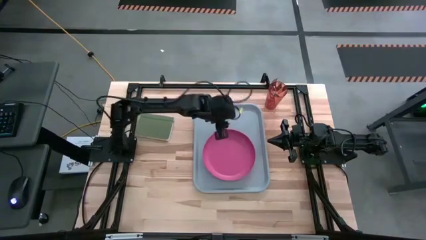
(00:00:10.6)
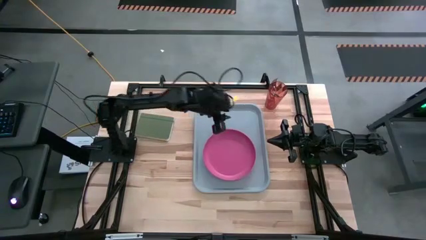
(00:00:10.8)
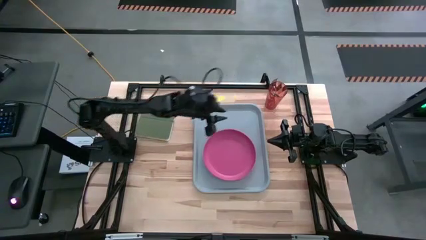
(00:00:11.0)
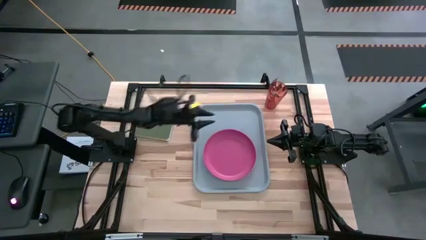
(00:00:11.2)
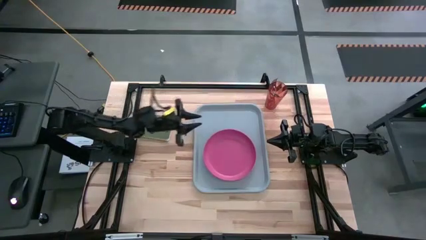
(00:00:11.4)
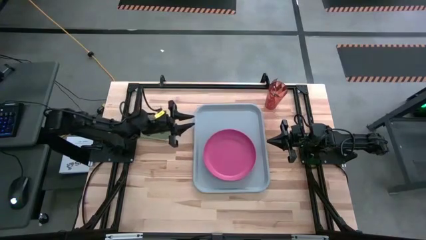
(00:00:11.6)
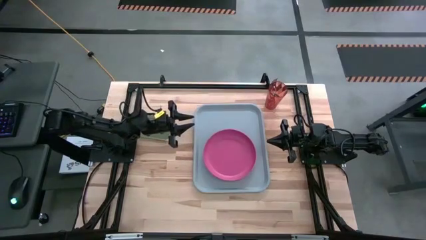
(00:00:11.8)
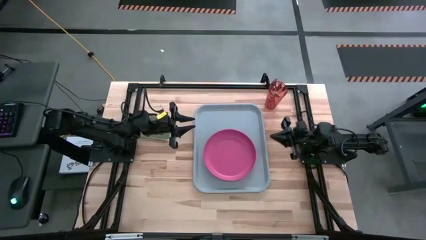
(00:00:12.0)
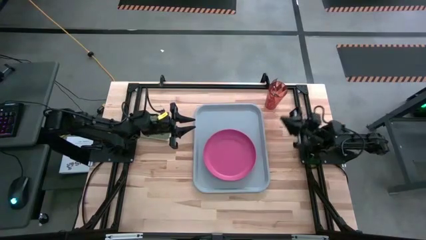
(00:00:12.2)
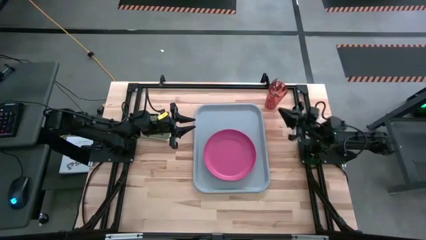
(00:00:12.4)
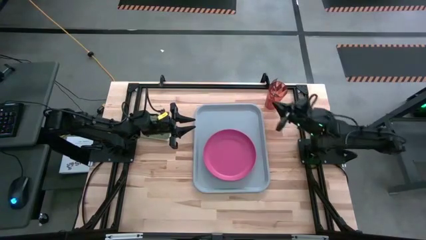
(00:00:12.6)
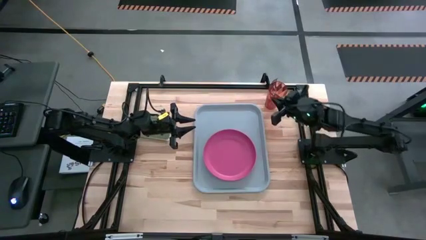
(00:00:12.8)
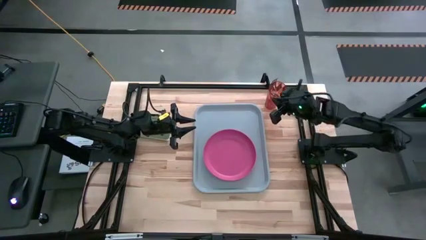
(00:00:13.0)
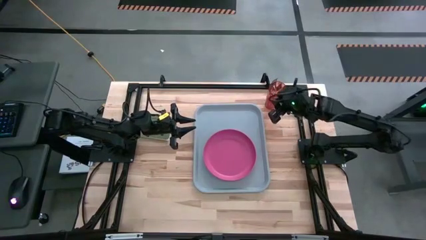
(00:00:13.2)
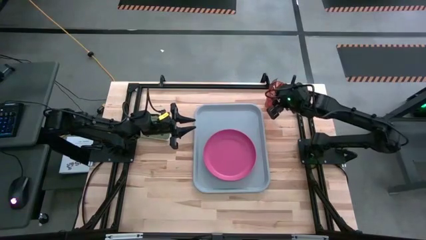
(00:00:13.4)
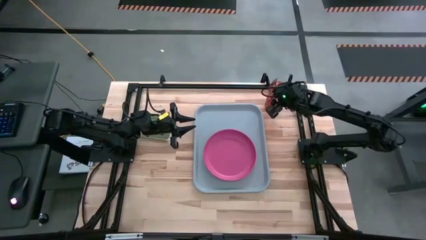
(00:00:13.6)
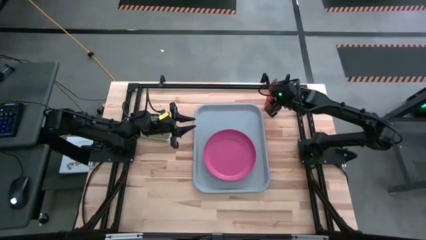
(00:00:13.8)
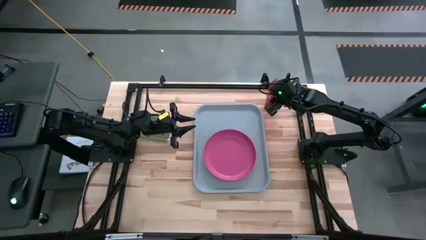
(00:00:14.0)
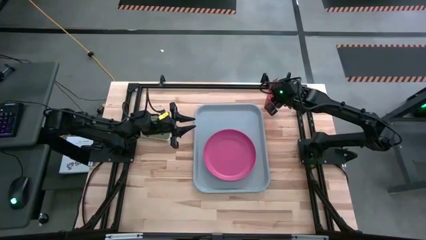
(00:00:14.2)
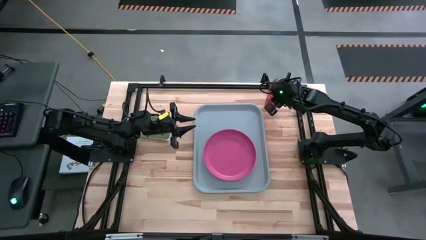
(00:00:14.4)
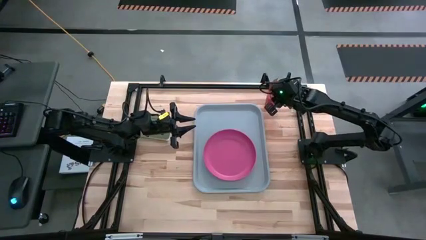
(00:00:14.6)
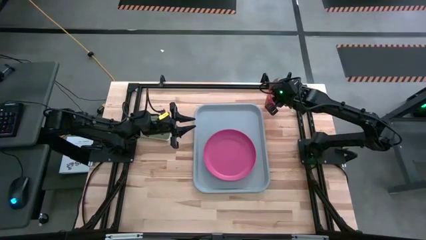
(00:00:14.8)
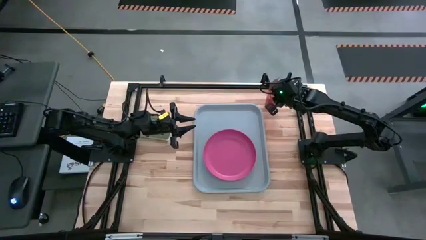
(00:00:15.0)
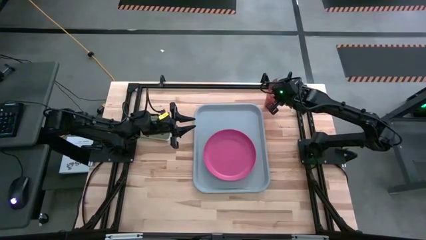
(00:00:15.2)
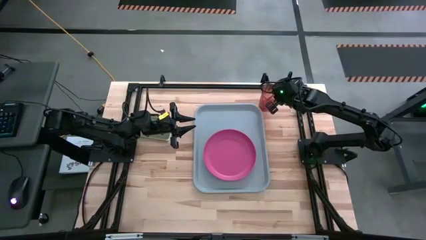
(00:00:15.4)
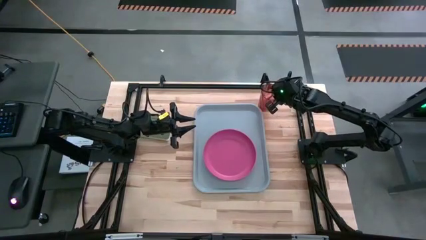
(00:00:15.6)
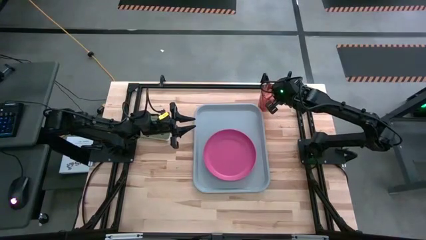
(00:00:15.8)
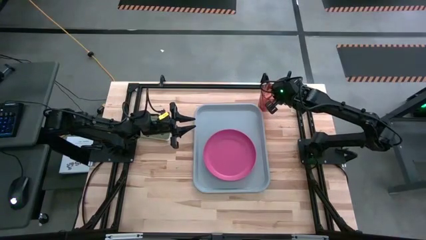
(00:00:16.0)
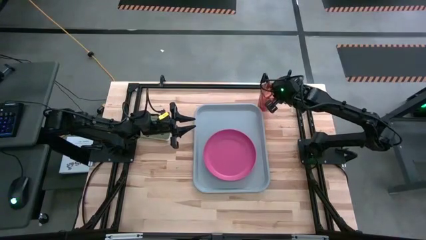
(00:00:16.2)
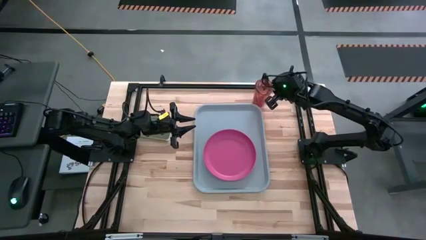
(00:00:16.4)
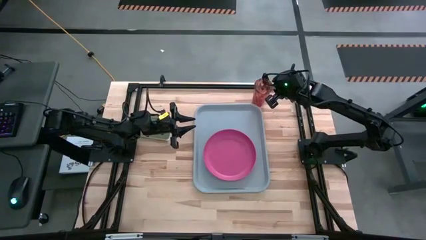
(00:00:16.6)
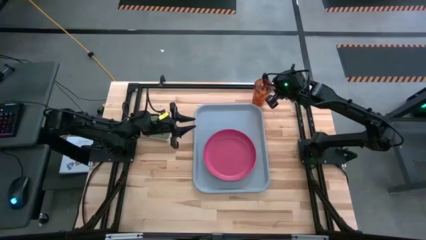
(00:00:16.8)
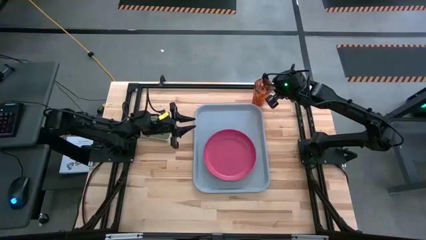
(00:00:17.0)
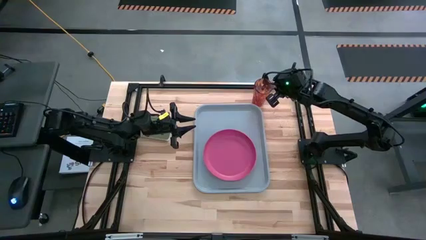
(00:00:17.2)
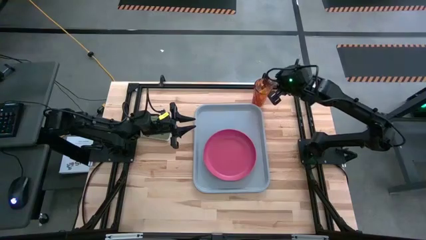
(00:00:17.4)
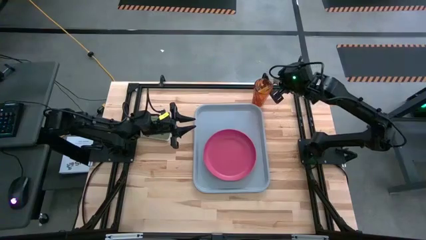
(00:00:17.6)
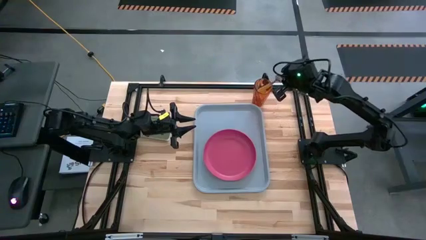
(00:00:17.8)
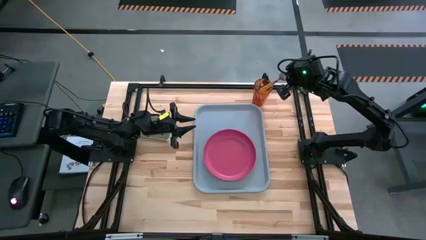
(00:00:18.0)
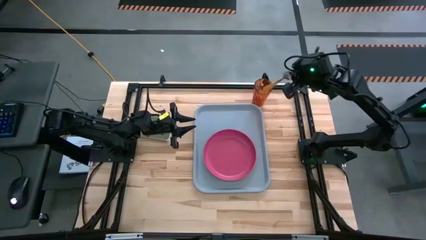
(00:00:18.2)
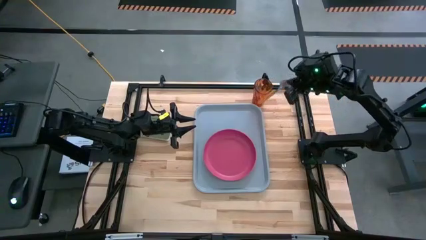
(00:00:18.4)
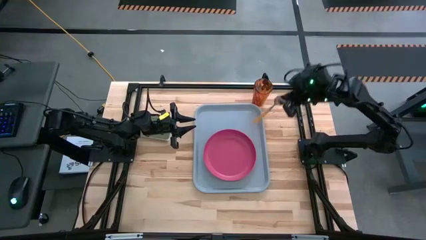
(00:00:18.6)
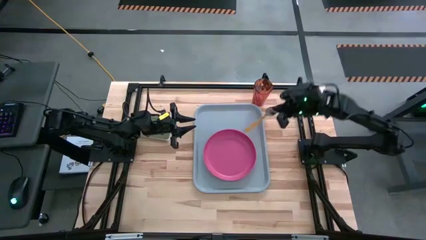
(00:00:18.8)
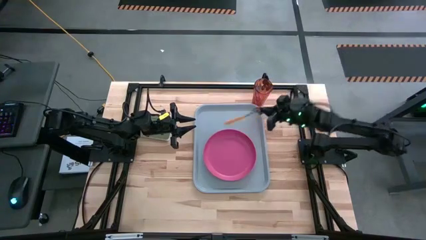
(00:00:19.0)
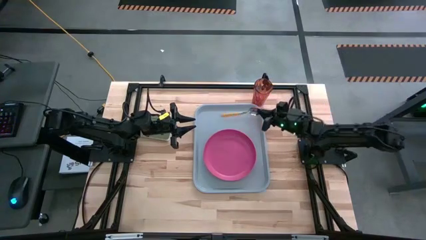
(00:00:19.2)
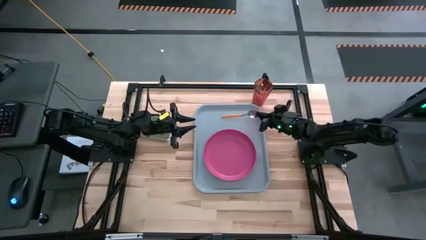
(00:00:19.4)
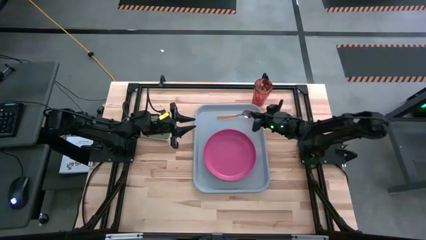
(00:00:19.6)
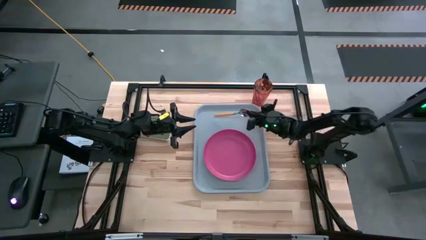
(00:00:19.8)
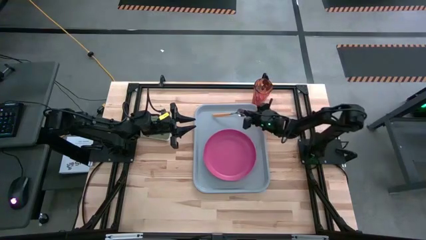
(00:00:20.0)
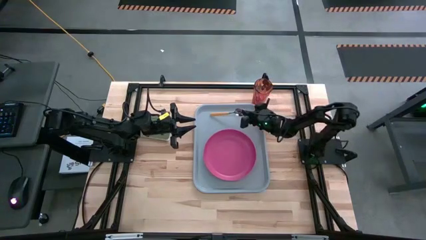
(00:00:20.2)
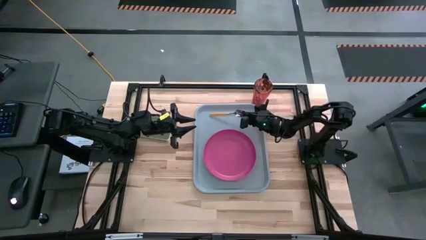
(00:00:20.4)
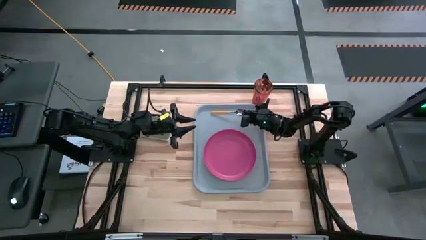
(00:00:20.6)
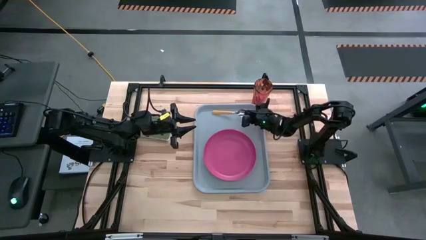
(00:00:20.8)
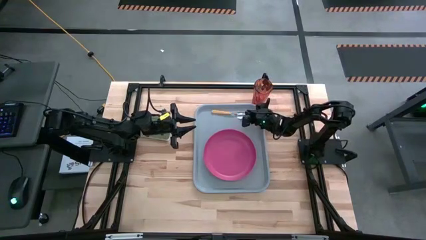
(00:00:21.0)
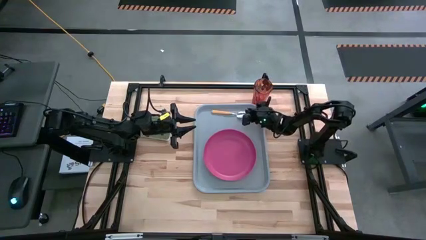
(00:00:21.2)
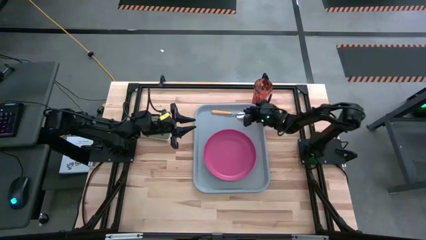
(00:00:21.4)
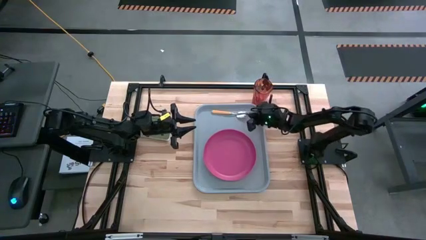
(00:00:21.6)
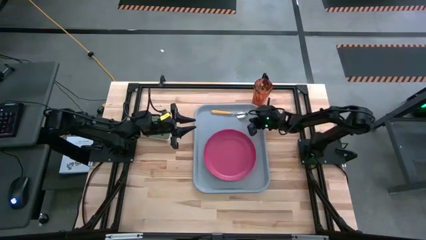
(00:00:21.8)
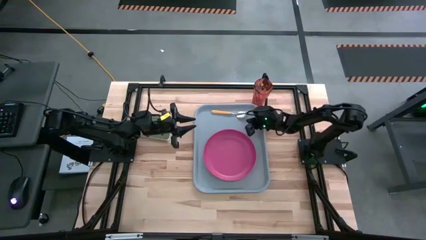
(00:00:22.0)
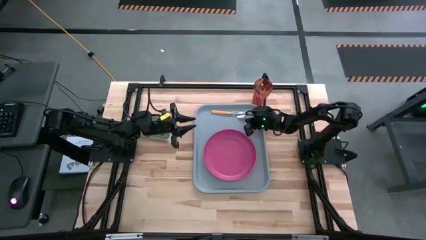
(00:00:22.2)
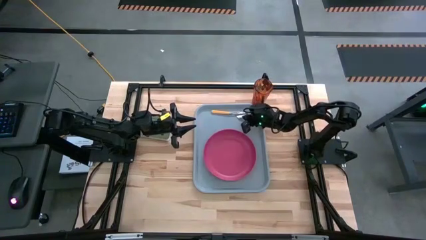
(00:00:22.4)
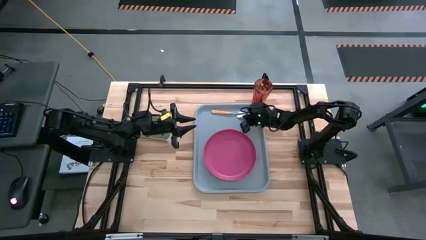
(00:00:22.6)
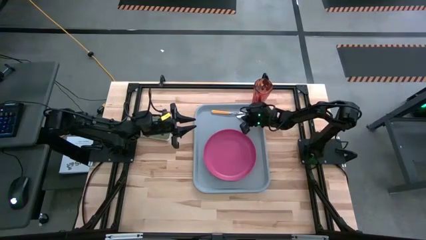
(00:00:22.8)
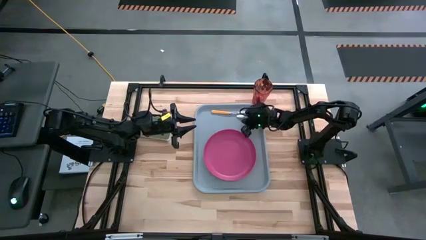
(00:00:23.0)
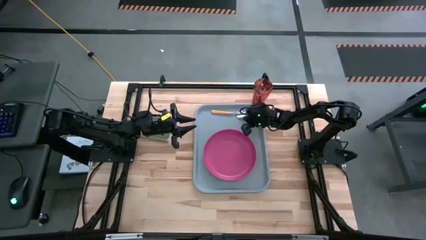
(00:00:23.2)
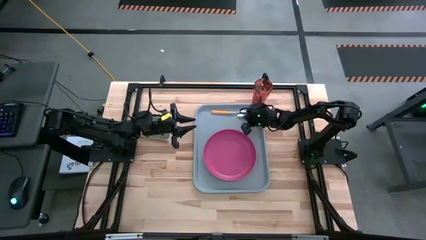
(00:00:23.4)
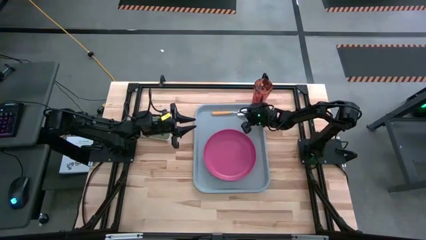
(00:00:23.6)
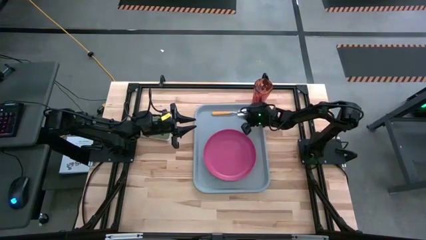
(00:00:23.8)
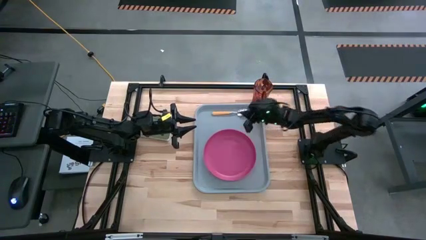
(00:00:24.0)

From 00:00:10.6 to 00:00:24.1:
Task: Pick and place plate/cup/fork/spoon on tray
Put the spoon on the tray at the top of the plate

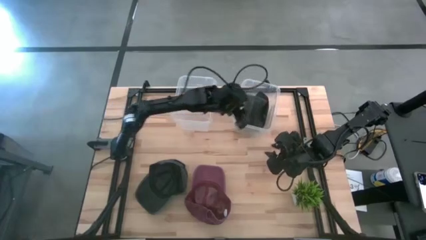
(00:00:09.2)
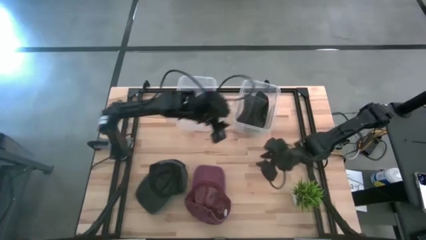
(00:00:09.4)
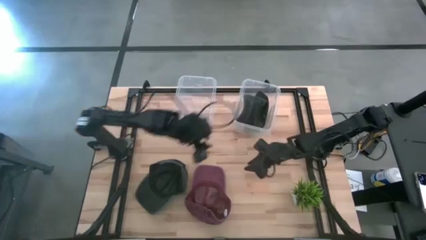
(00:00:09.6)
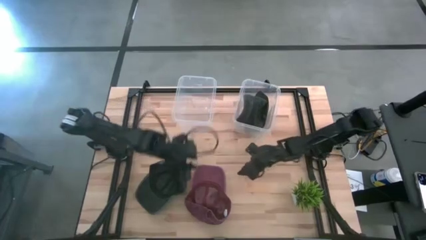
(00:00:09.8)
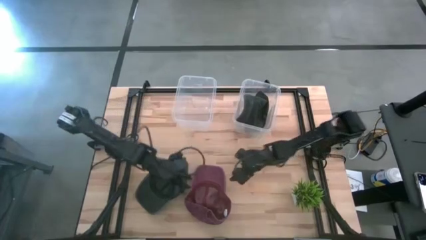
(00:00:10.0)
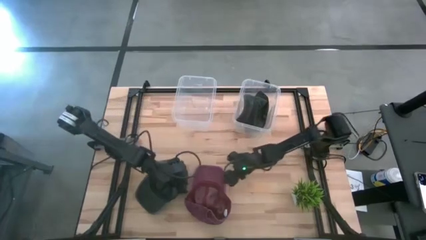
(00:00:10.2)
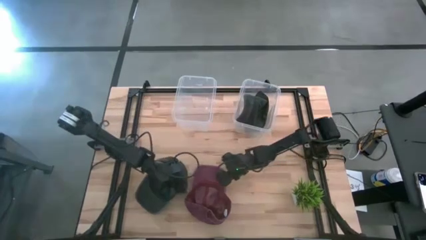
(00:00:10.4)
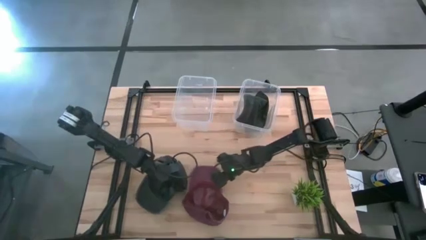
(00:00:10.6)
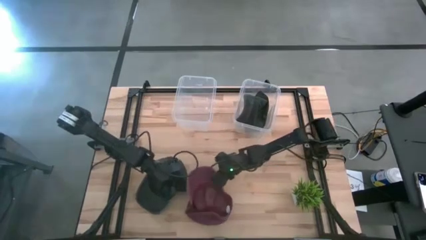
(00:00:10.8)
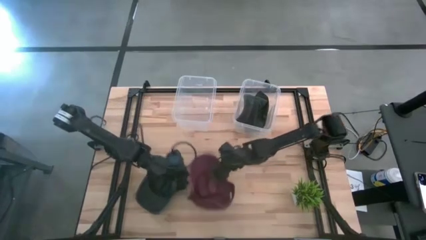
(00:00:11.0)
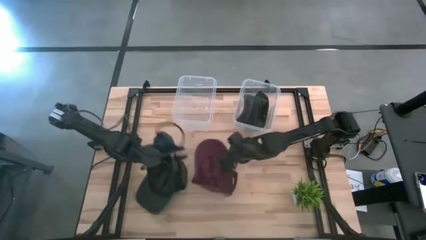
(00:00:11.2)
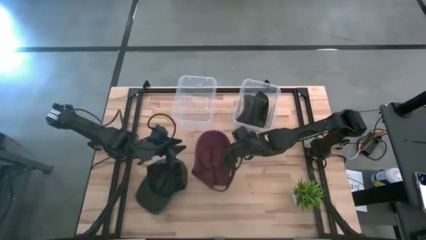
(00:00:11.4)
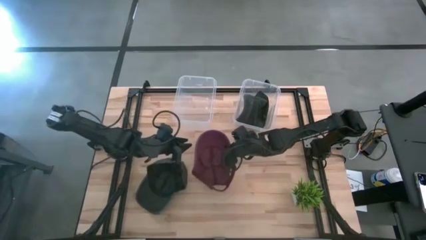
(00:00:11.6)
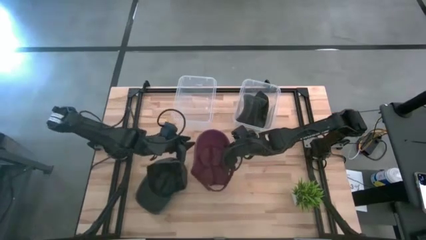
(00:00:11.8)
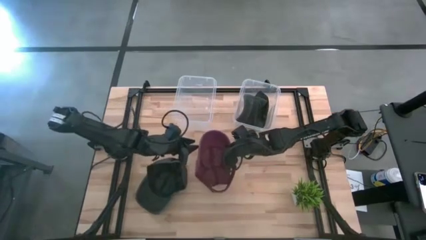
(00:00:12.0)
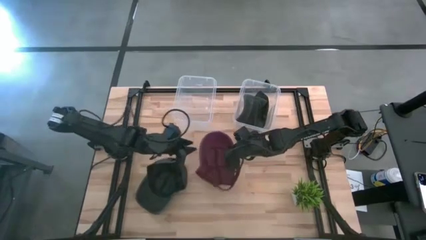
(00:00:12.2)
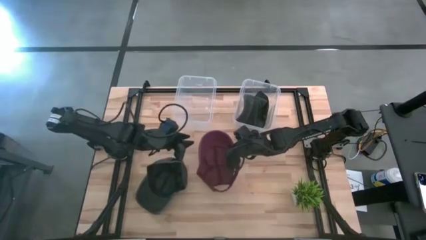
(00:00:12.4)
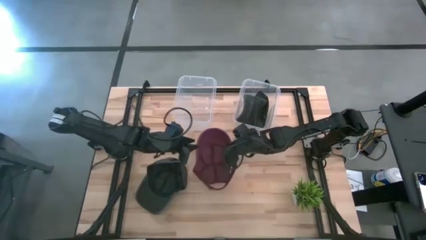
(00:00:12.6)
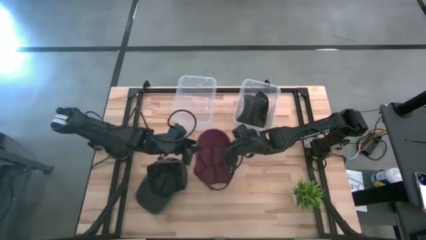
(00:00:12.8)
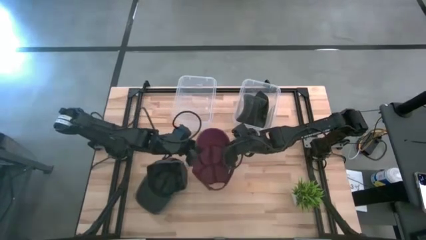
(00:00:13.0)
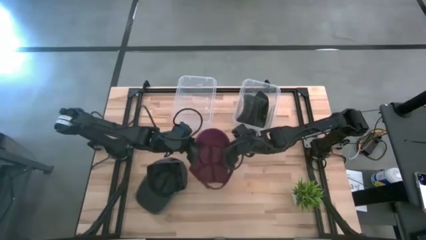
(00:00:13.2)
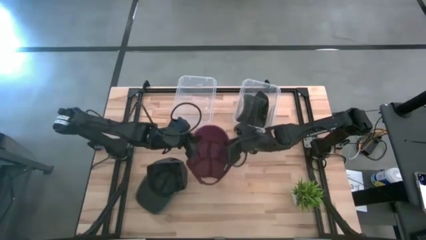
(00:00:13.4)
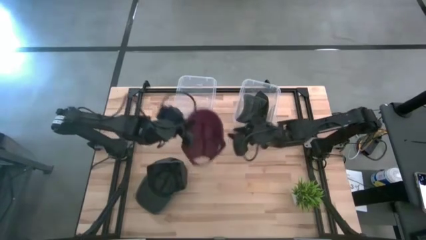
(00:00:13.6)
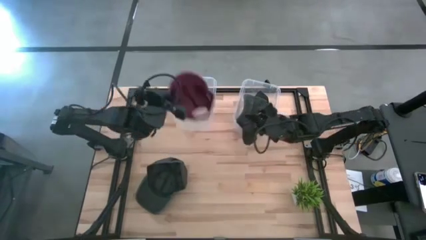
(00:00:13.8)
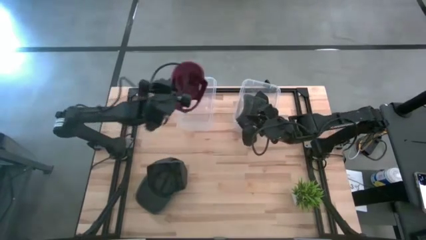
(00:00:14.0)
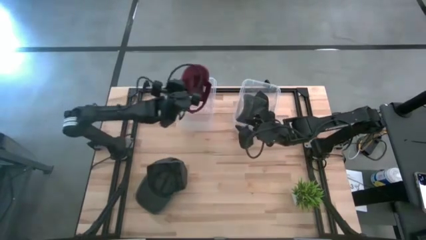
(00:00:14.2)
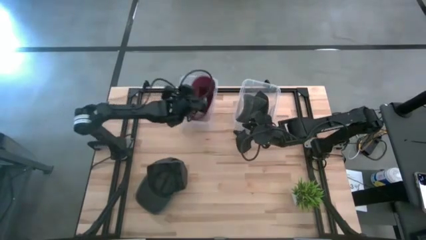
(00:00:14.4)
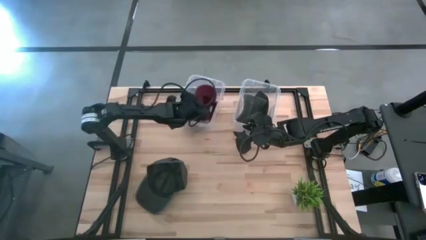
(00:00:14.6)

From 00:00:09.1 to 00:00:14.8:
Task: Pick & Place hat
Put the red cap into the left transparent bin
